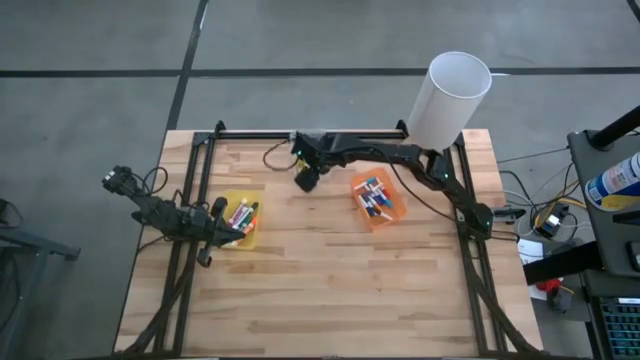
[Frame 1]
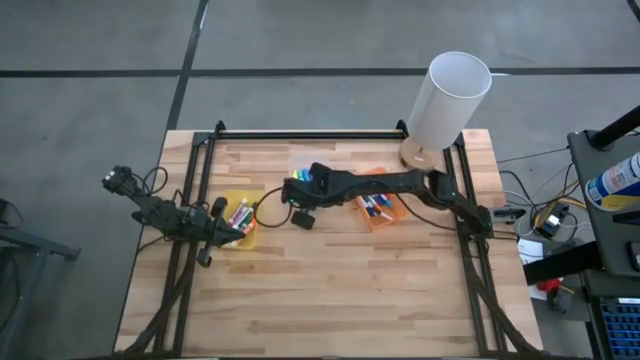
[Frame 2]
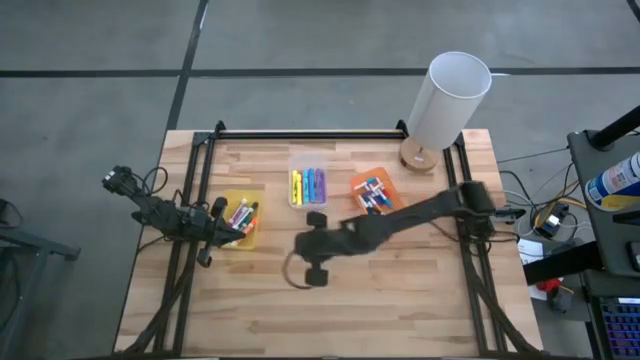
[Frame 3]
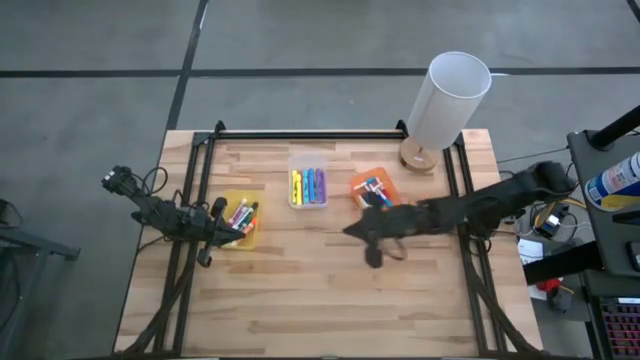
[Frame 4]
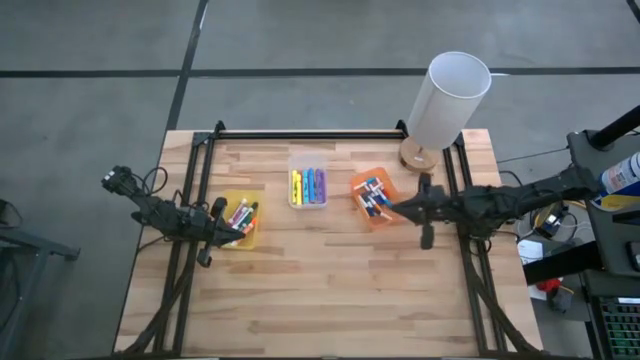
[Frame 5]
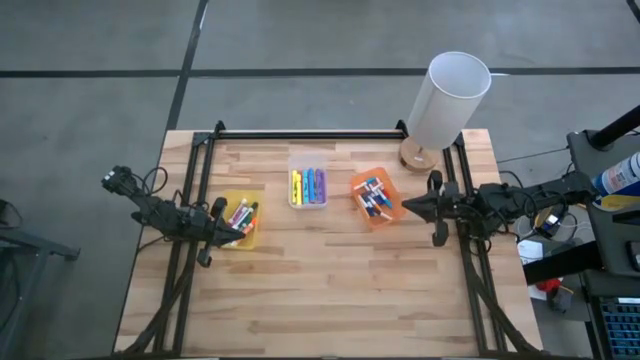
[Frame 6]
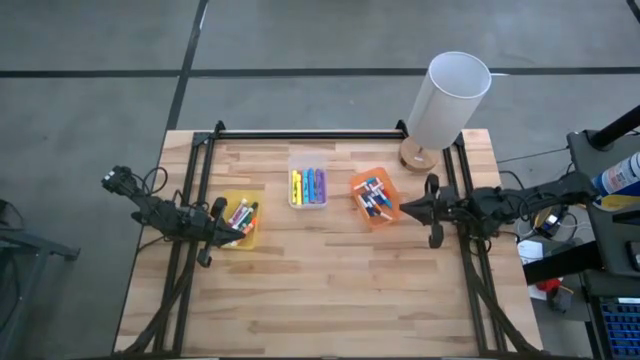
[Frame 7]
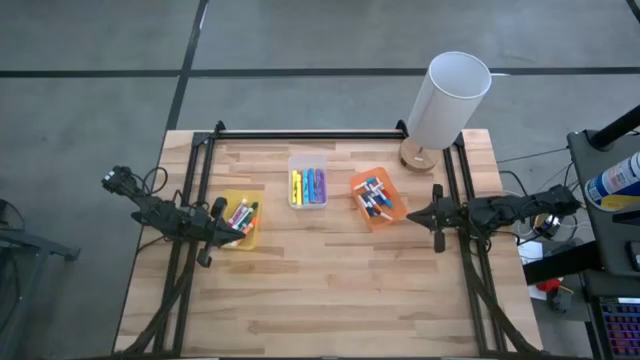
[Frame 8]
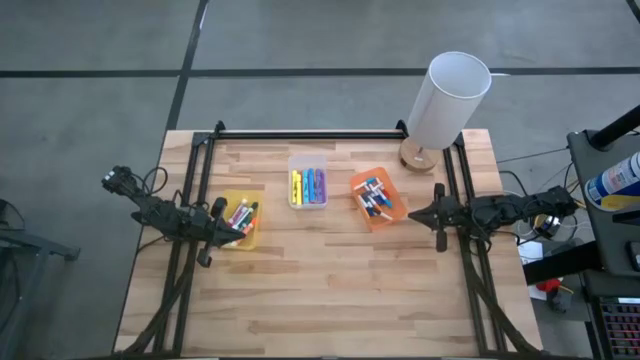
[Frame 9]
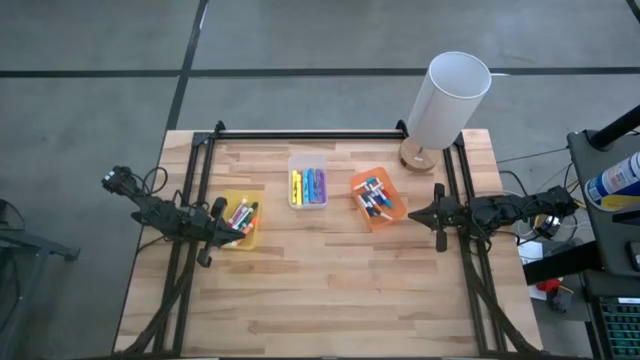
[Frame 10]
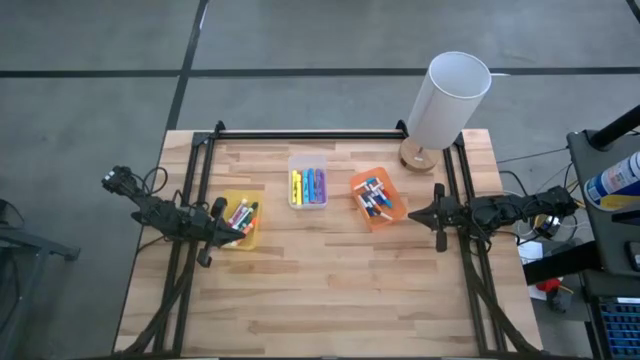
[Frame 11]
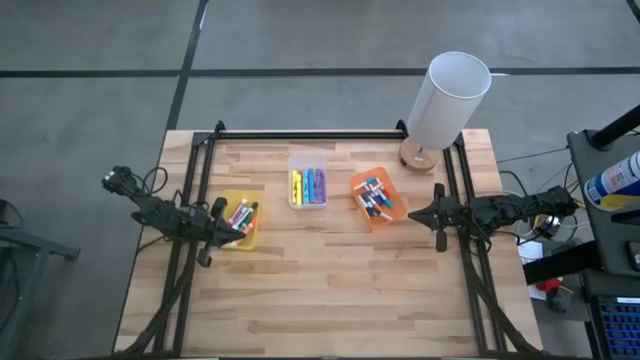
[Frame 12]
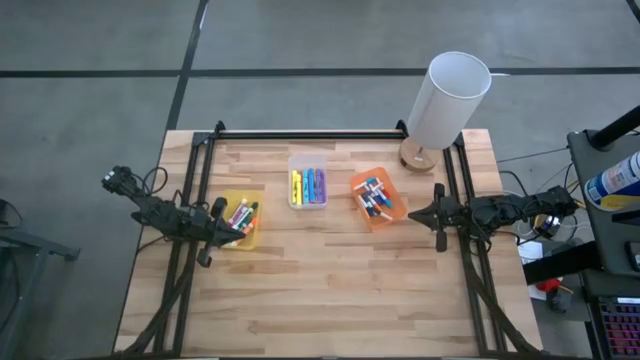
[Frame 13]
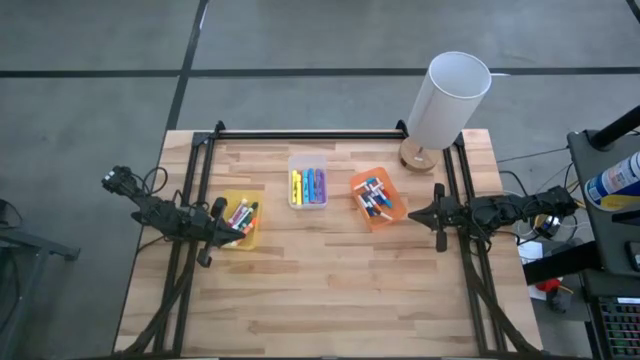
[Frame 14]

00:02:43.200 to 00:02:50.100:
Task: Pick & Place Markers
Return to Home Position

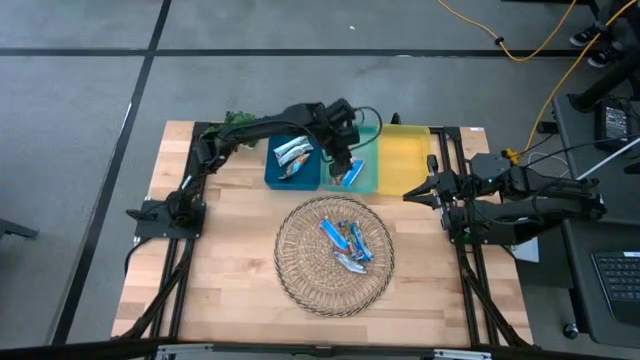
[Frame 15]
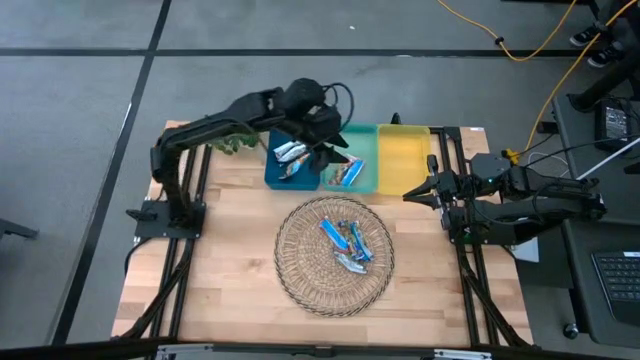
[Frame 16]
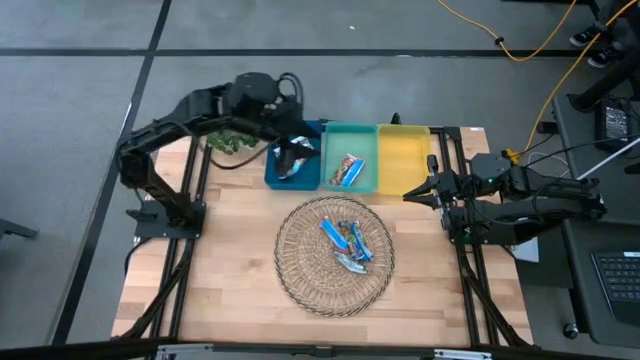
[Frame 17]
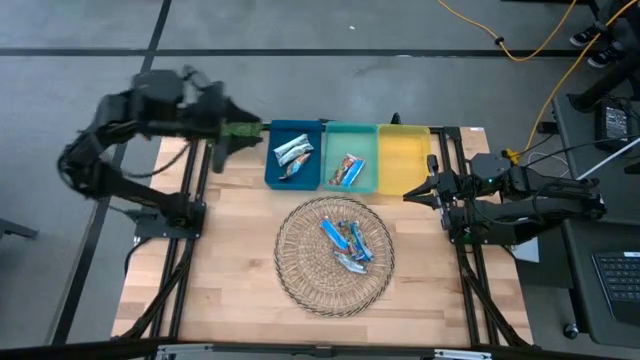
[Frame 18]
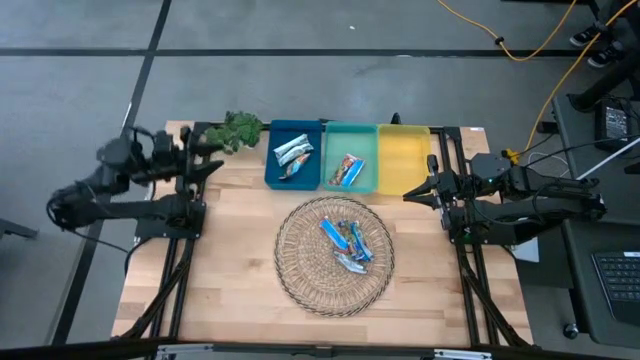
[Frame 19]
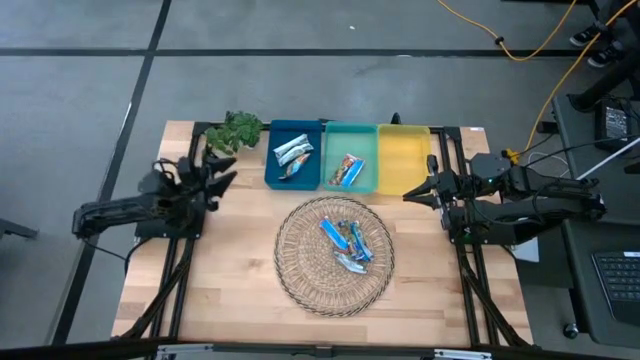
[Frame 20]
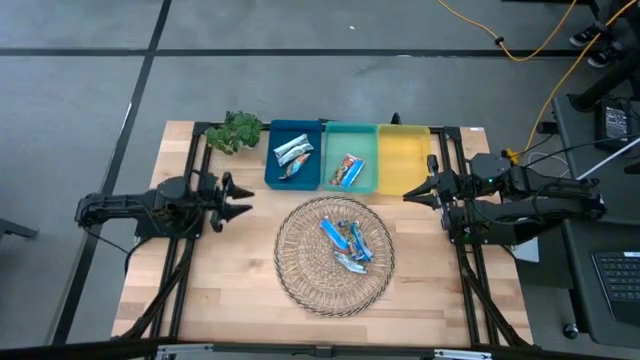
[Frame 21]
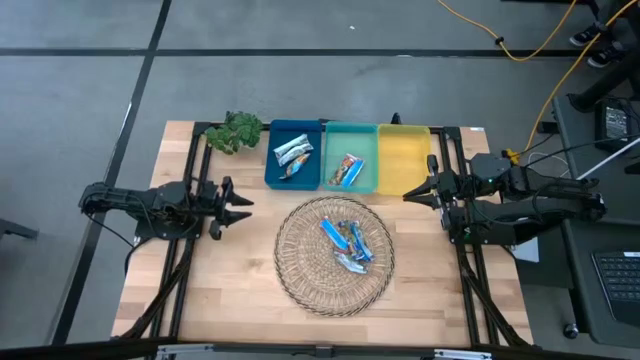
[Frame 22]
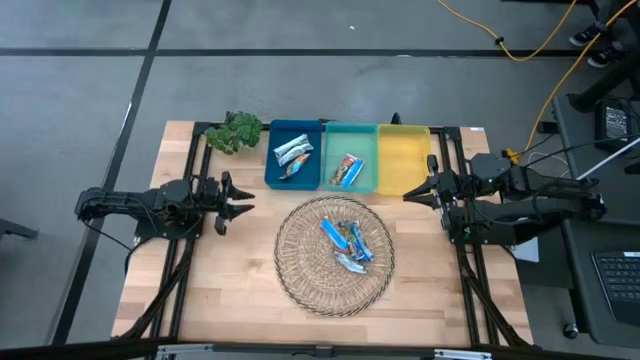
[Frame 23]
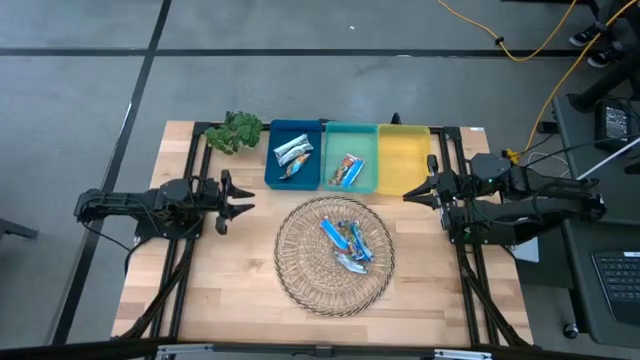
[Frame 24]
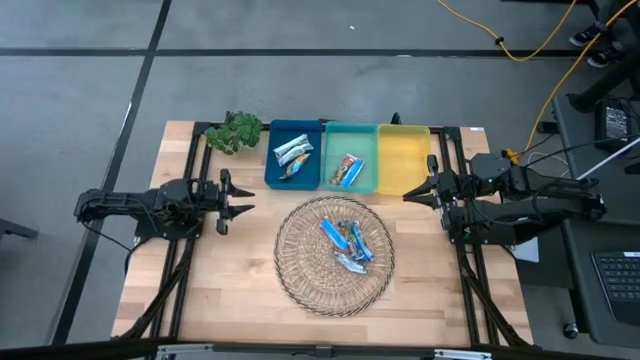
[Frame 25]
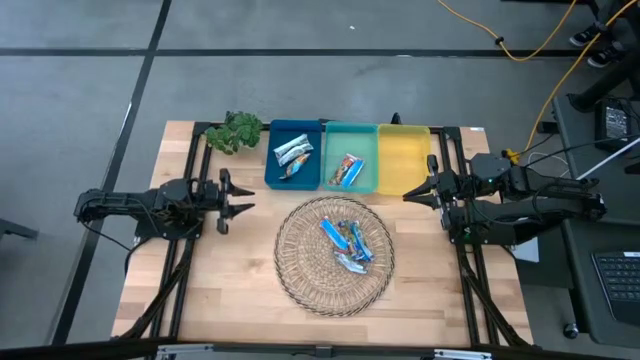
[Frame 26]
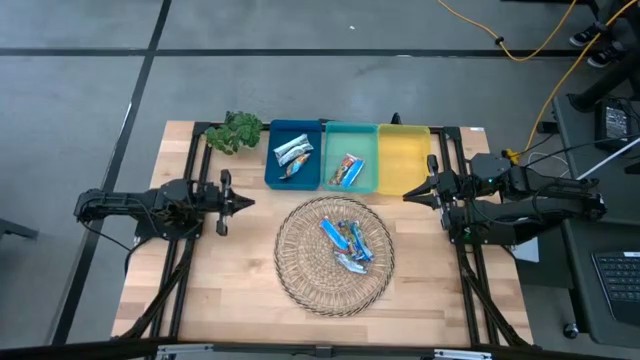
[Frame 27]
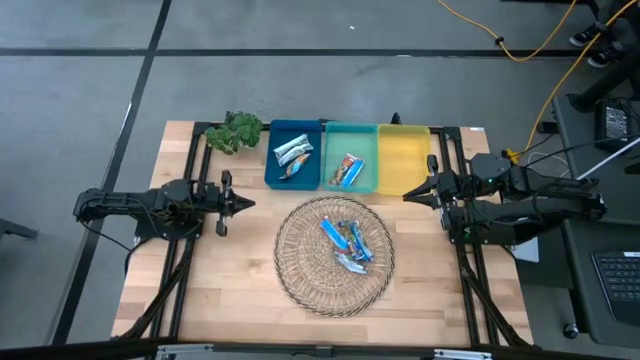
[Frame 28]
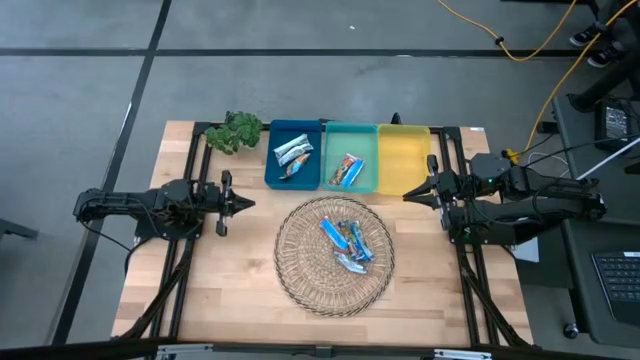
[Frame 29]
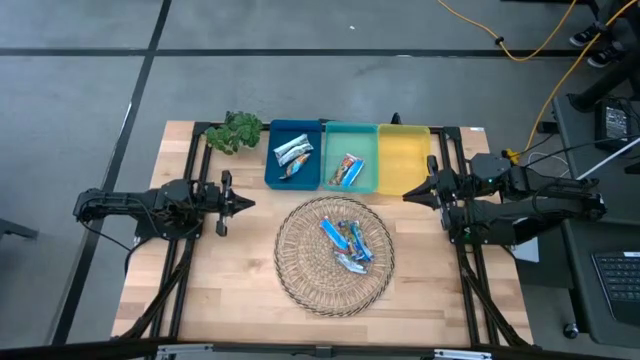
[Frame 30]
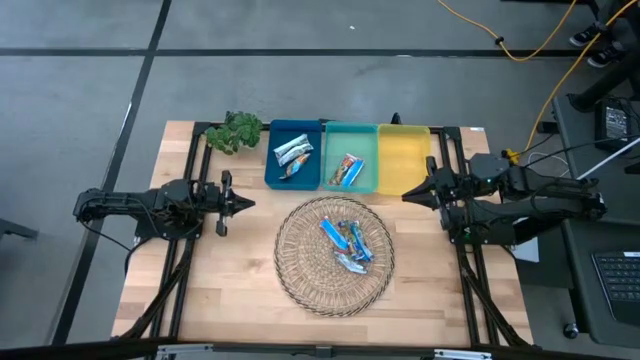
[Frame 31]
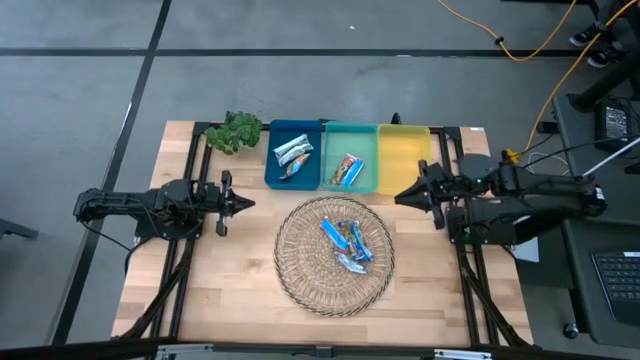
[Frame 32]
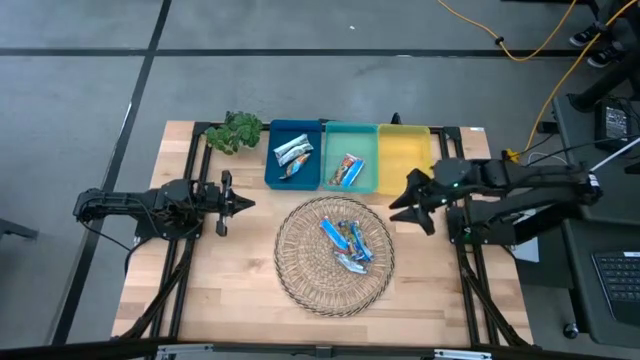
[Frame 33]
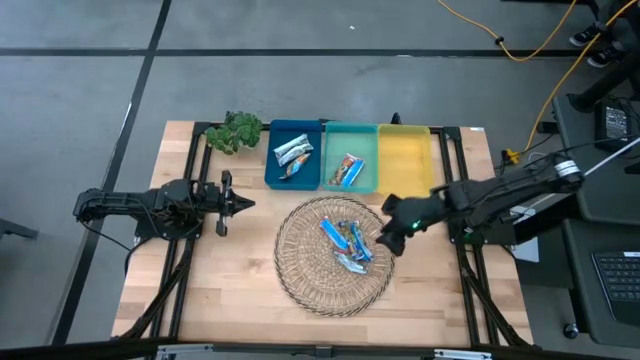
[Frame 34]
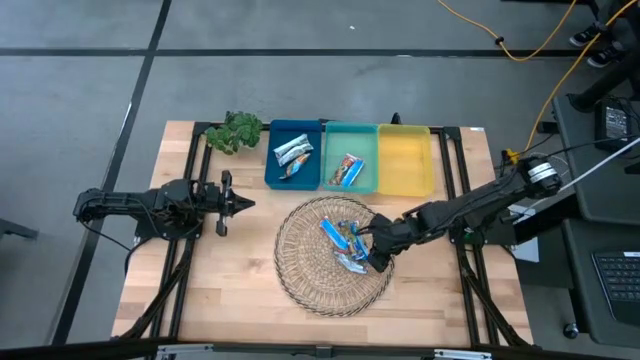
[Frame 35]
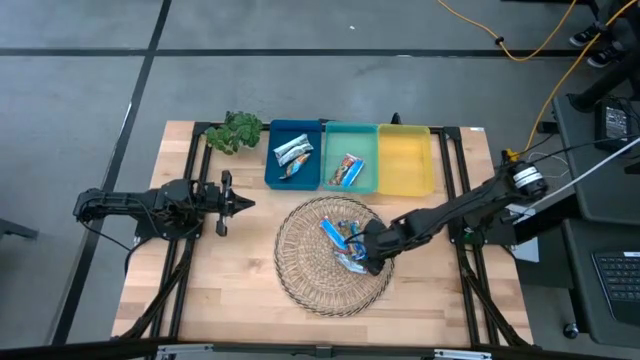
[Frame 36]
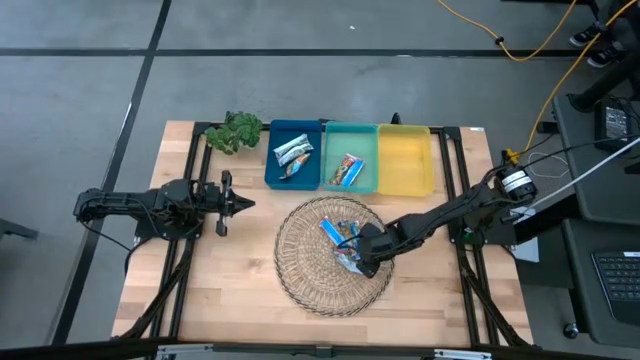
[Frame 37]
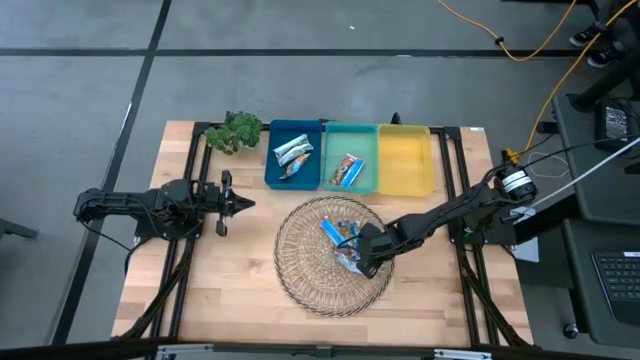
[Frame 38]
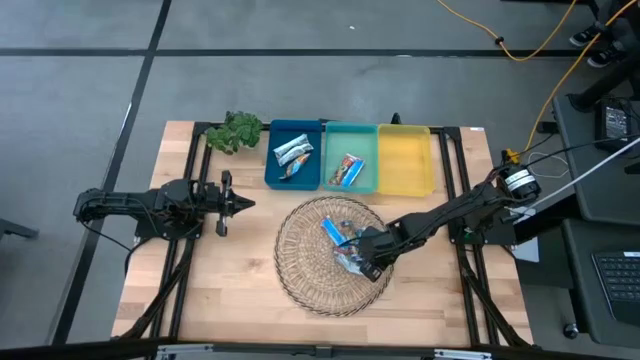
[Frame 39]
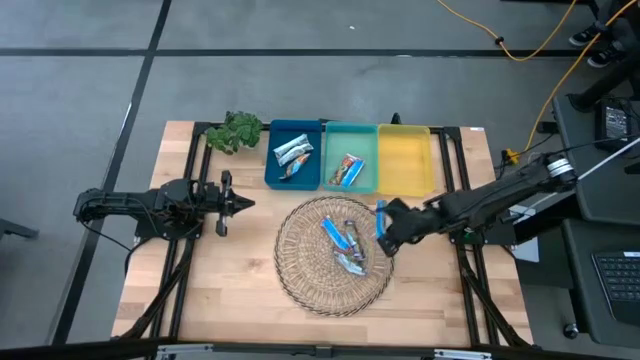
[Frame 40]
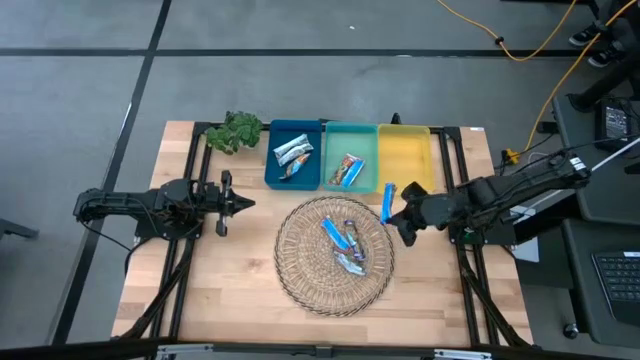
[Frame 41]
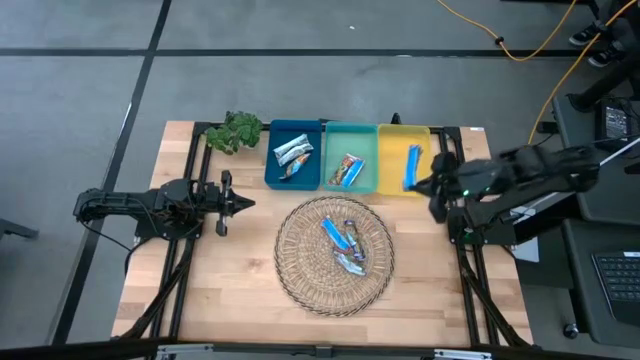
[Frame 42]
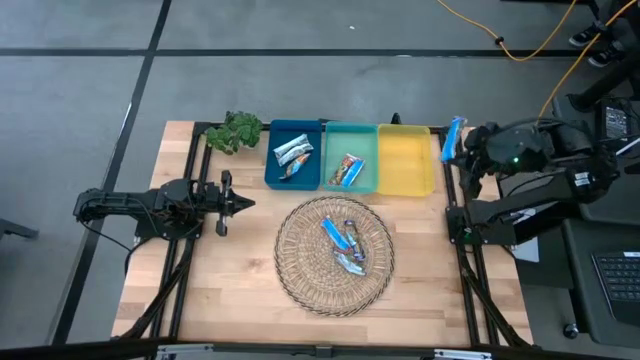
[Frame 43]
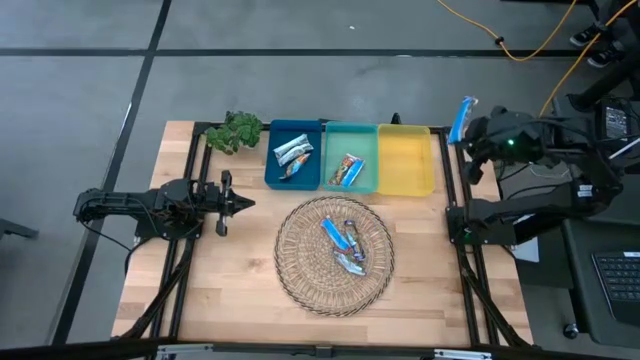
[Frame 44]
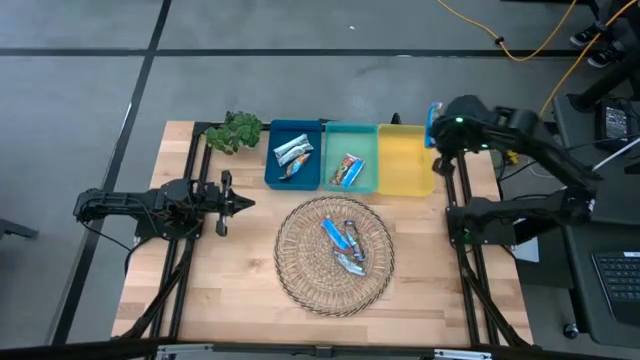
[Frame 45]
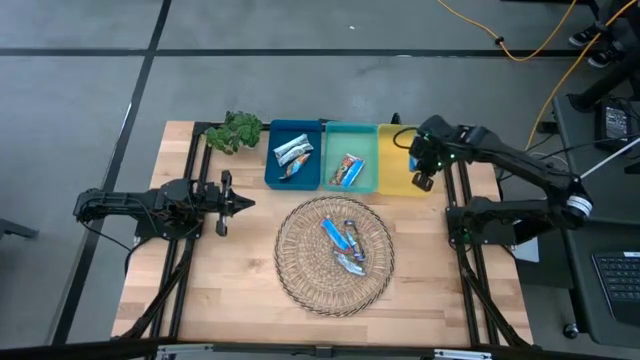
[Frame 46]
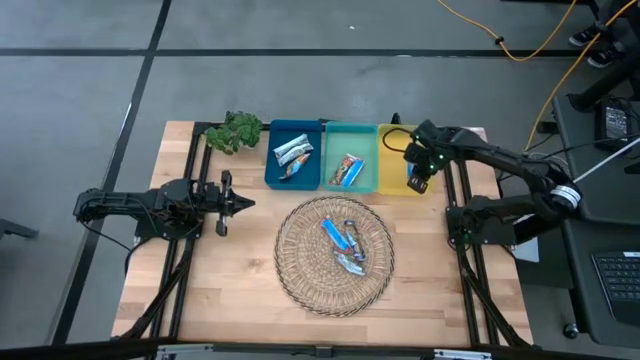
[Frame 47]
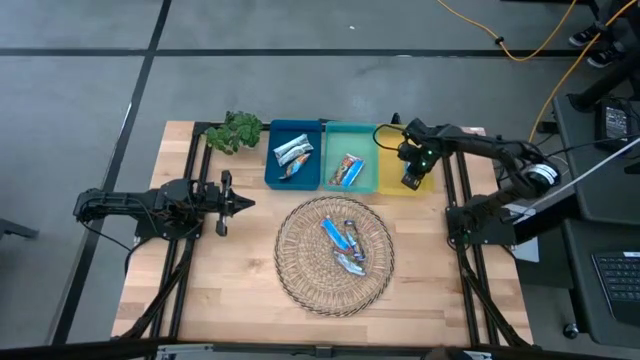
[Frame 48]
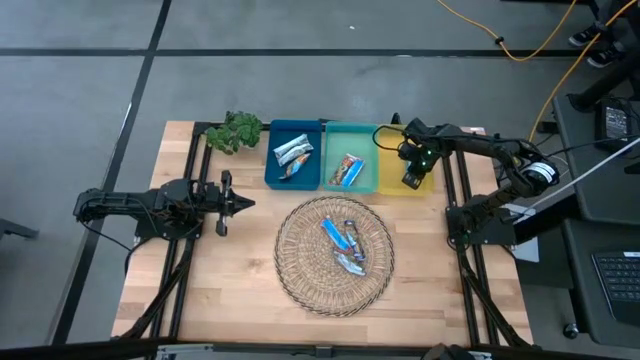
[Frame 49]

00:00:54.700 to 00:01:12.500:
Task: Pick and place Granola Bars by type
Put the blue granola bar into the yellow bin
